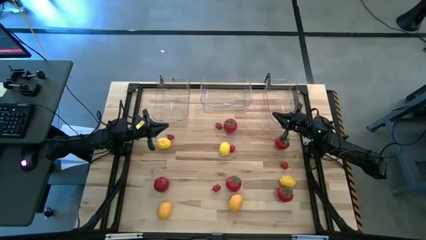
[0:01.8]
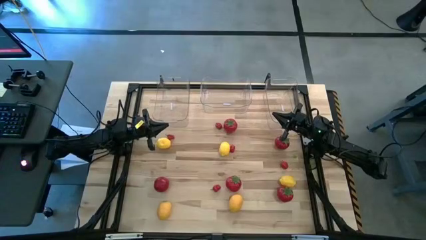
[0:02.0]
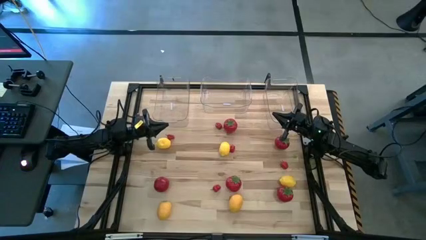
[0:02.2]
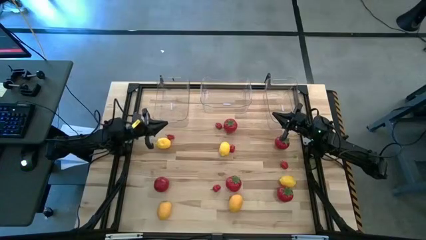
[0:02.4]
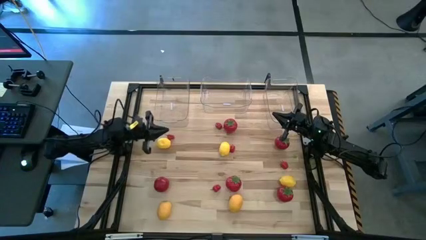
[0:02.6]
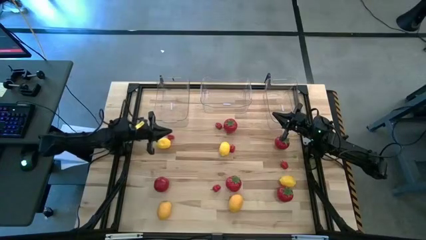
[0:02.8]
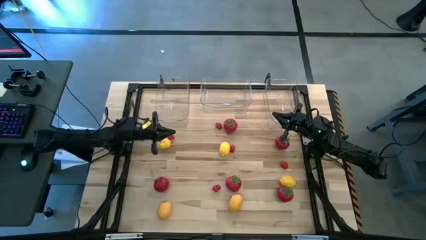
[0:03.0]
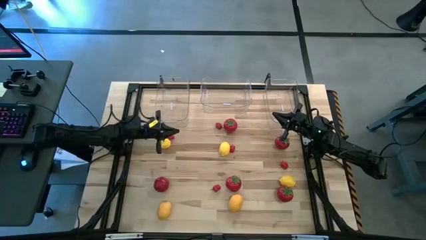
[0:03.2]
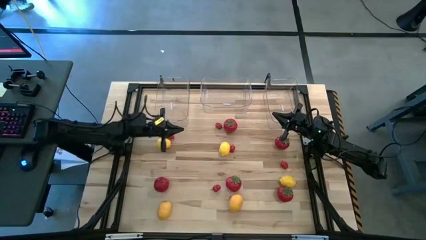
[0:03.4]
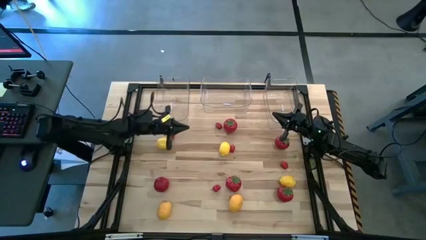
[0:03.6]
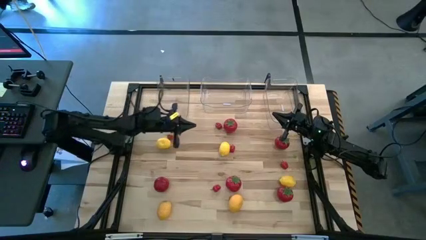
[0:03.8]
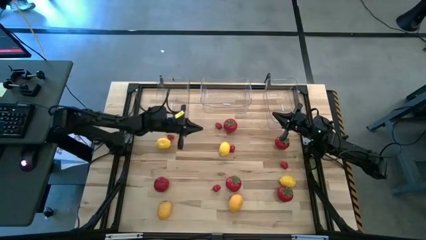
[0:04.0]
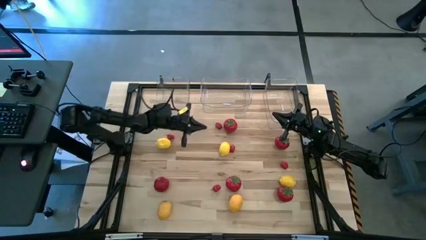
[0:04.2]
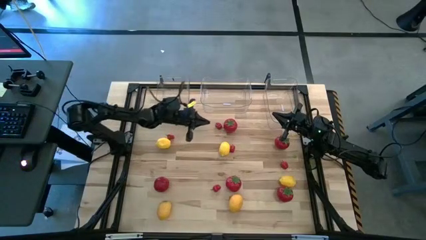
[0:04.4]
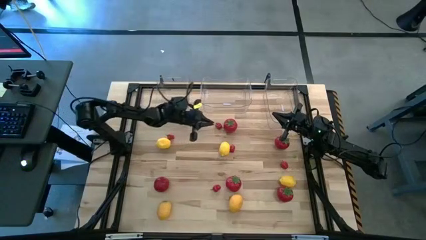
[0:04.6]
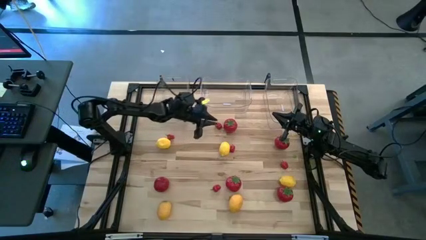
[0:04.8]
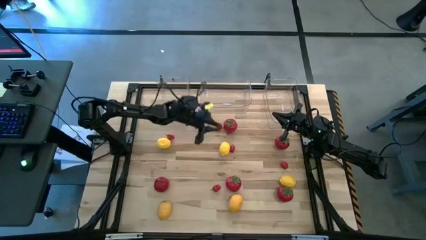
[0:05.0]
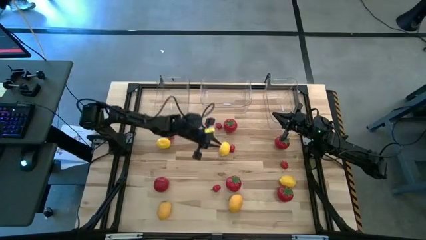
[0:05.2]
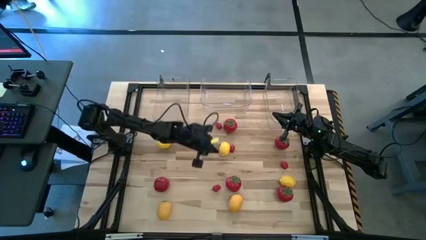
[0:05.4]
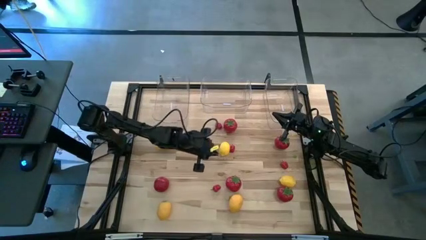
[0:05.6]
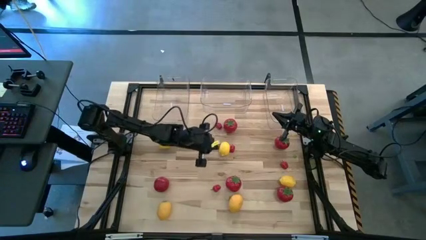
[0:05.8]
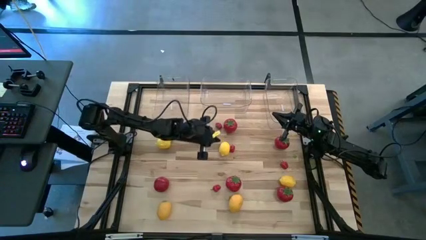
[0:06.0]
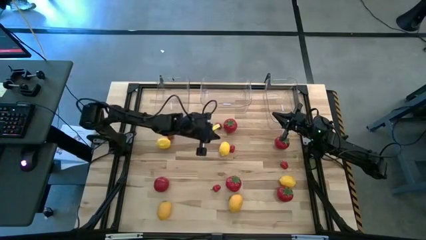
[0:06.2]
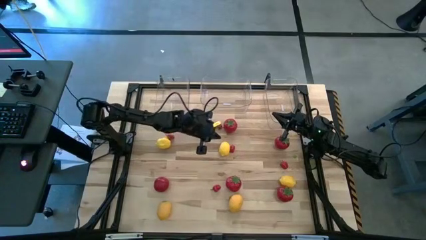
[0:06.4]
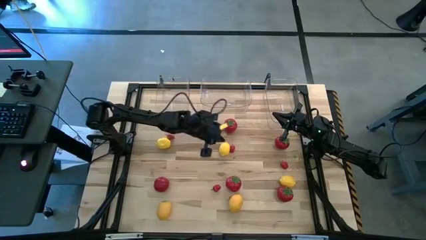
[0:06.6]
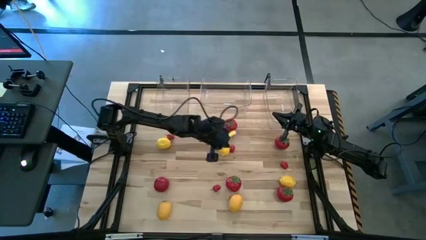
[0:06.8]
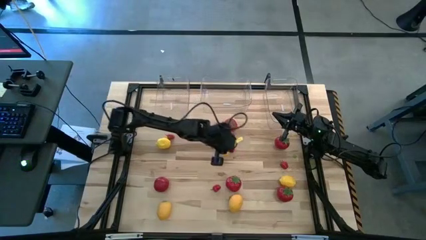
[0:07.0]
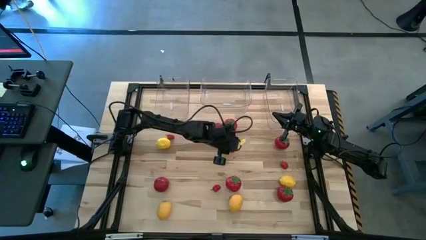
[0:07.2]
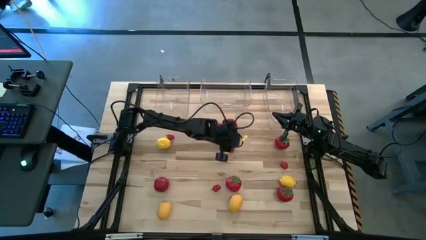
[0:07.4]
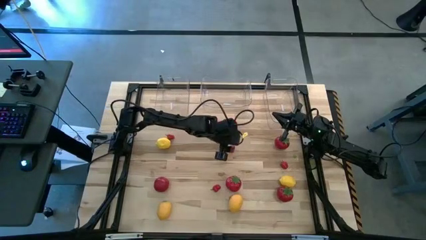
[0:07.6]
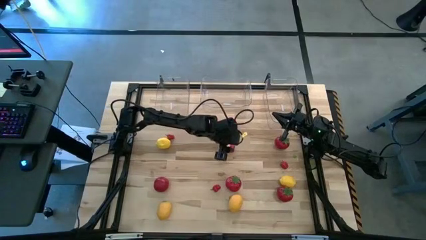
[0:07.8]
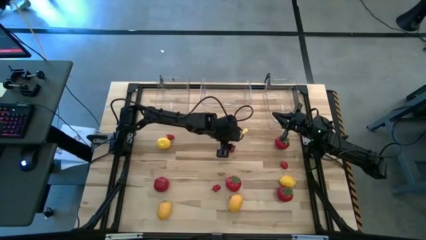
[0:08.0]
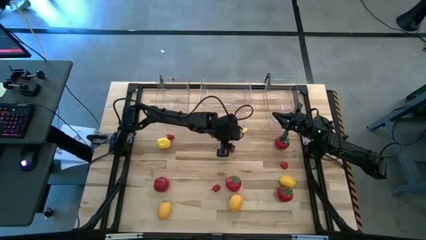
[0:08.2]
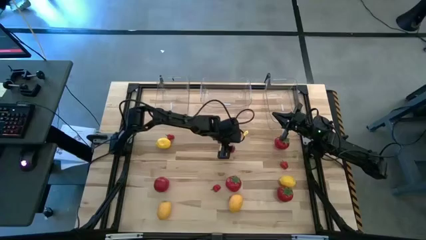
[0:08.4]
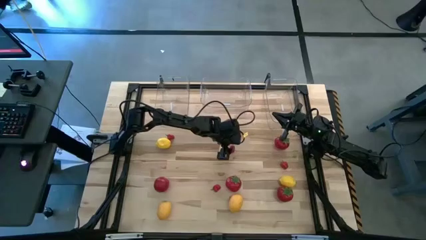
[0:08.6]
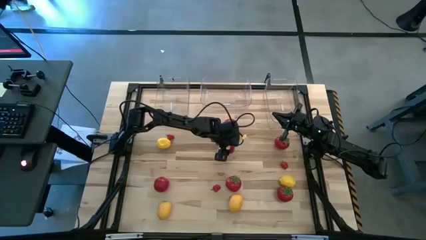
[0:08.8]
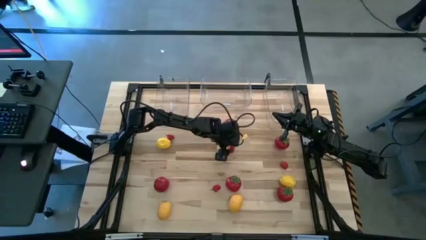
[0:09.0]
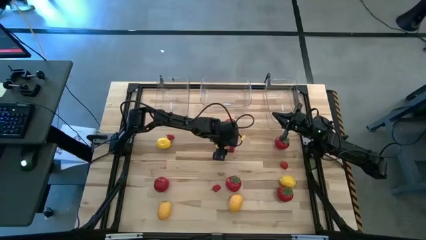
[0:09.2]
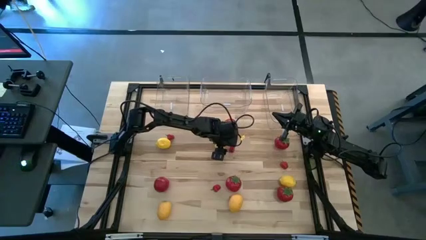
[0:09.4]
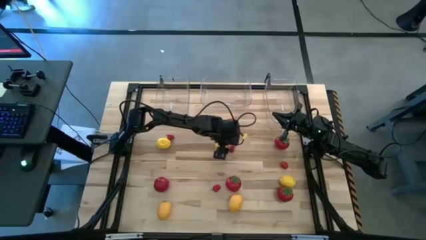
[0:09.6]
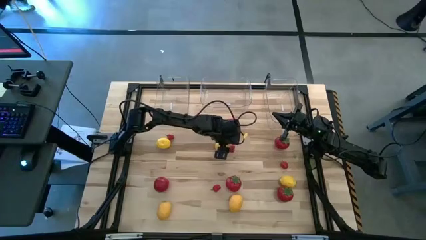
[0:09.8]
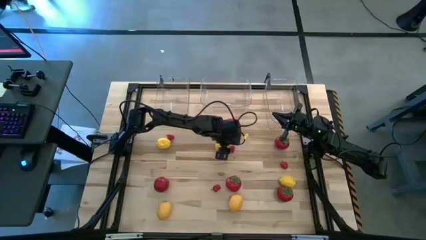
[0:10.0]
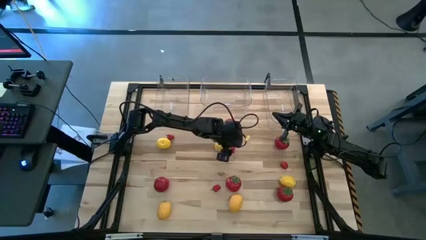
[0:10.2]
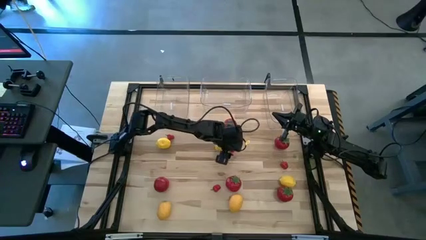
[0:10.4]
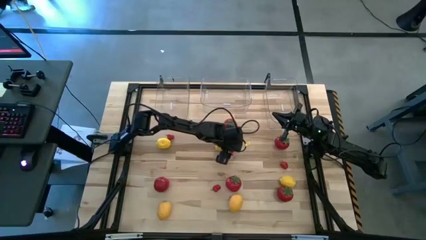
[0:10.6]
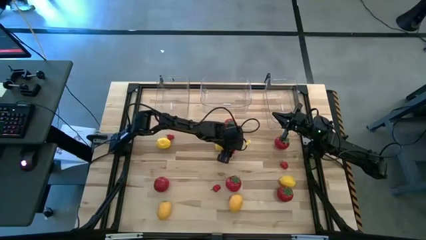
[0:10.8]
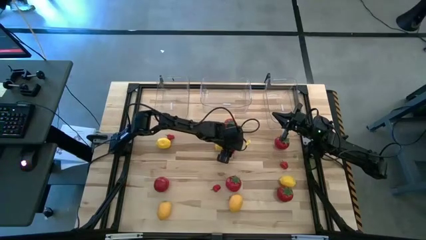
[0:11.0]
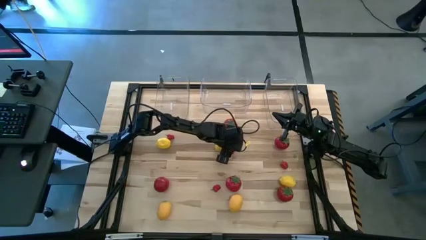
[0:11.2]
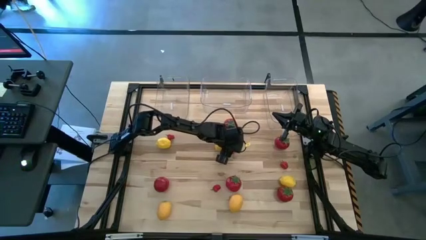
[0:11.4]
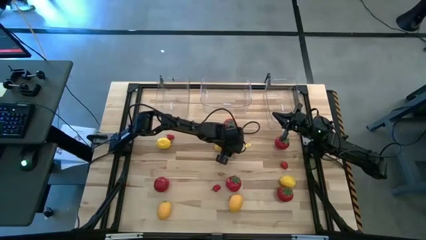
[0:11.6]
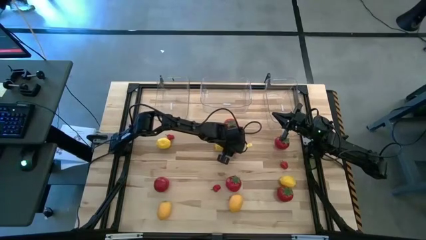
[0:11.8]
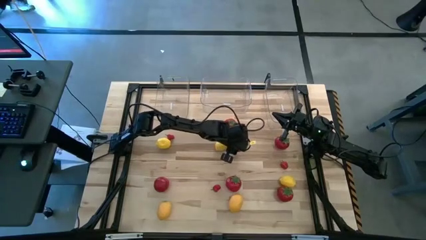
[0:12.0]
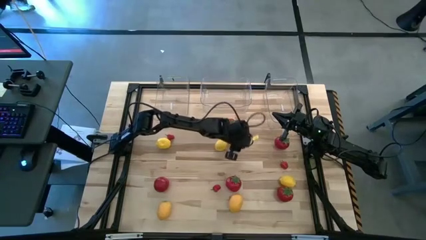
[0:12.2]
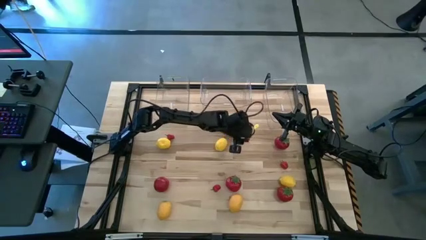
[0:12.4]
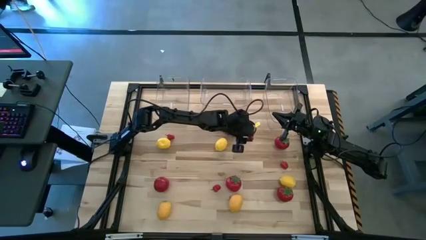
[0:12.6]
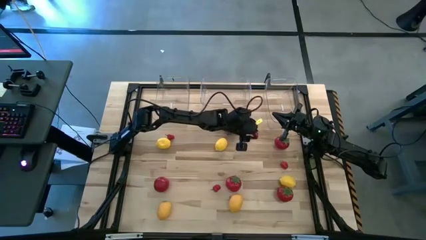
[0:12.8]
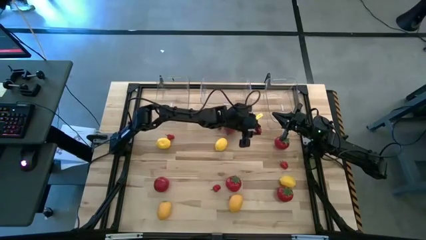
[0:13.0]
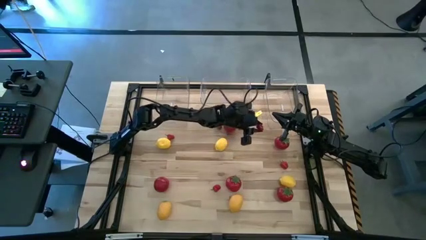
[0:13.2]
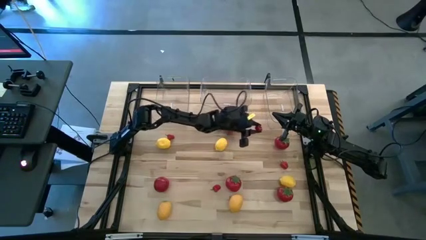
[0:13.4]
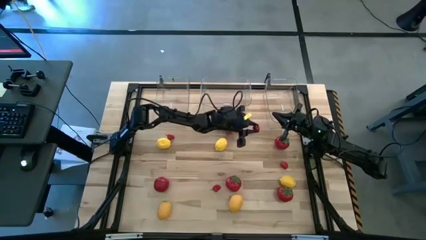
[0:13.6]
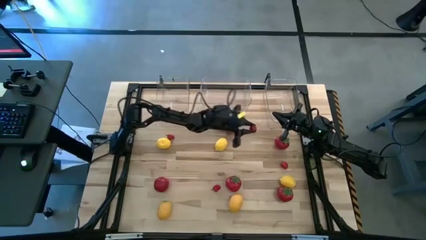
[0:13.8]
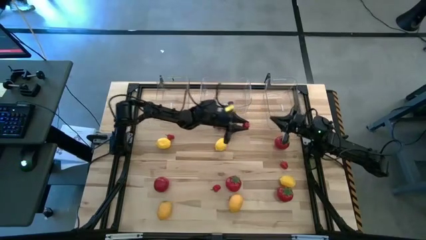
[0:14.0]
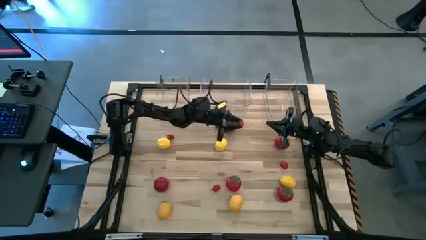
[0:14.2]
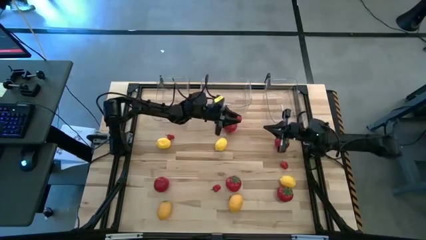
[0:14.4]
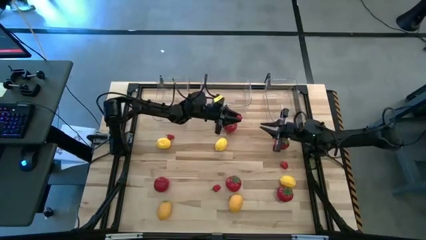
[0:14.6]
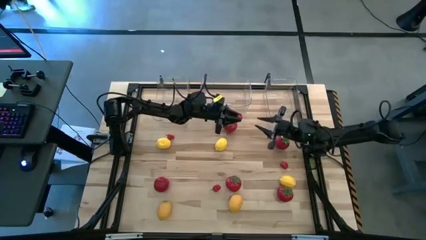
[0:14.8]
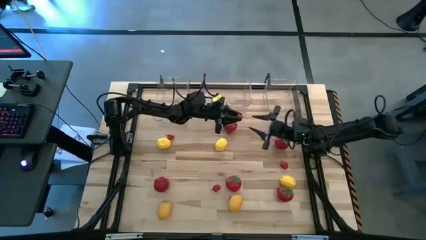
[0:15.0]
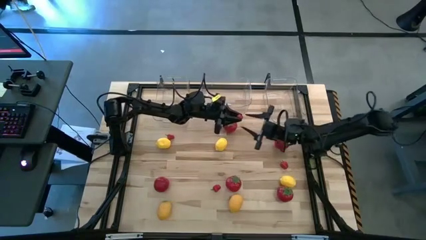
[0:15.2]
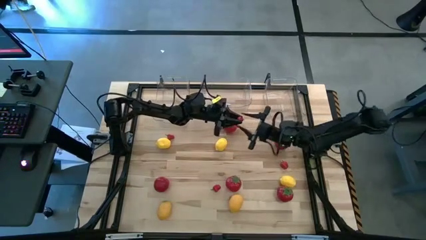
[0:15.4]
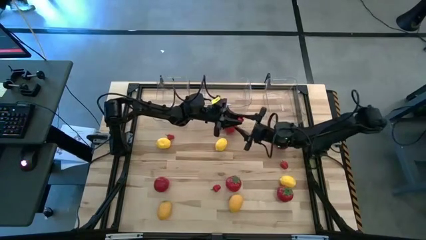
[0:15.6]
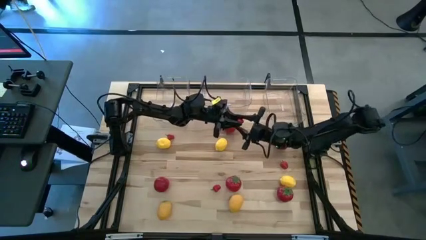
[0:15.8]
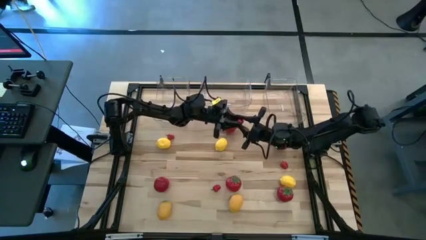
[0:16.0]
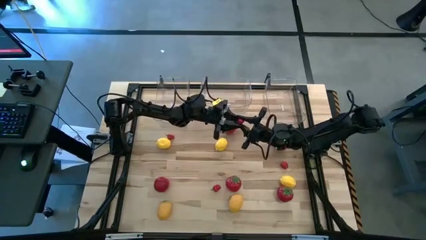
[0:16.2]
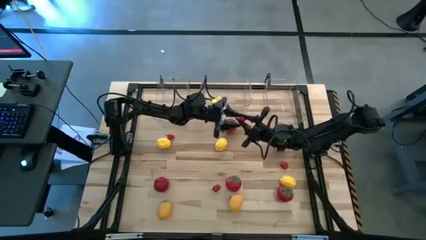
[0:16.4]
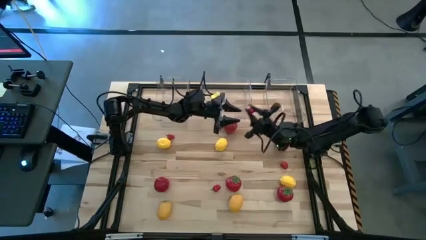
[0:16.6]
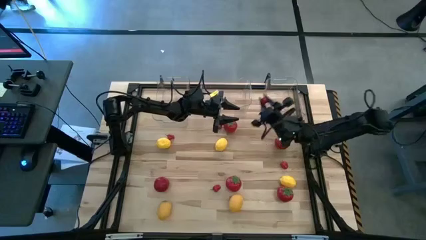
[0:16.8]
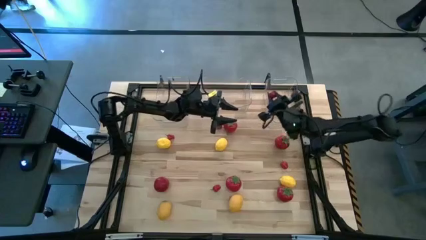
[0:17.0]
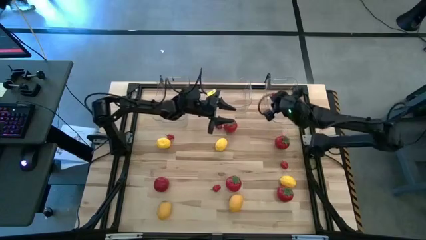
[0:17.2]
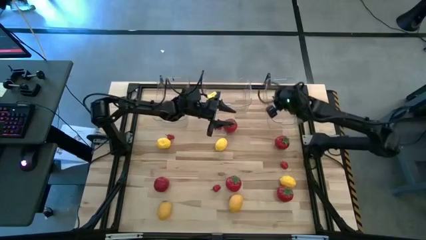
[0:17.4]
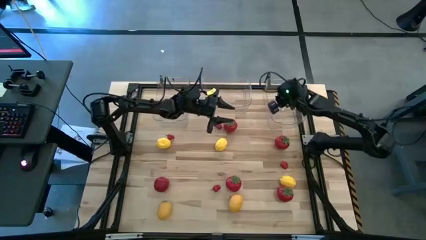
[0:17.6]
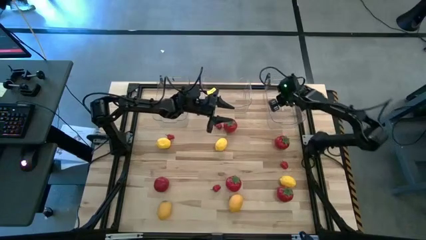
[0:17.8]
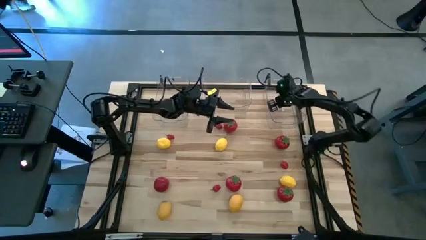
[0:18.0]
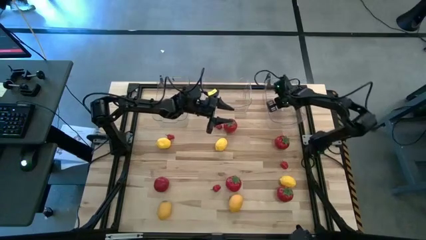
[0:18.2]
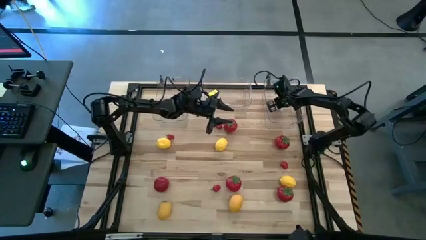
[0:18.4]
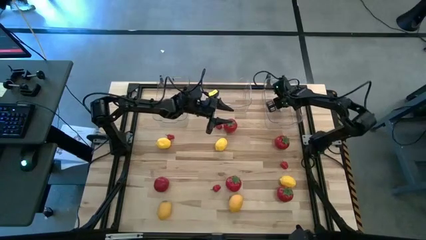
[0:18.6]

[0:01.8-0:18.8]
Task: Sort produce into baskets
Put the red chili into the right transparent bin
